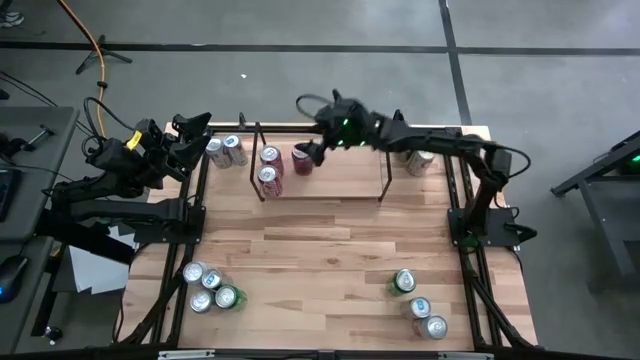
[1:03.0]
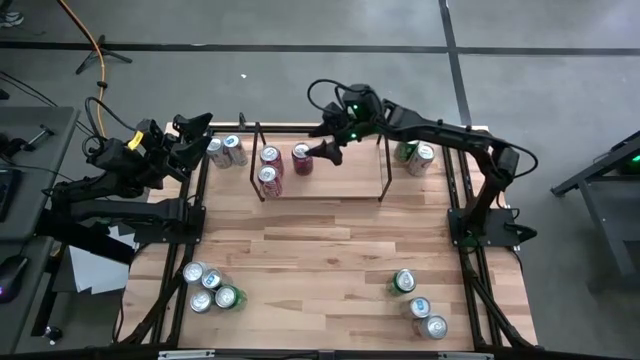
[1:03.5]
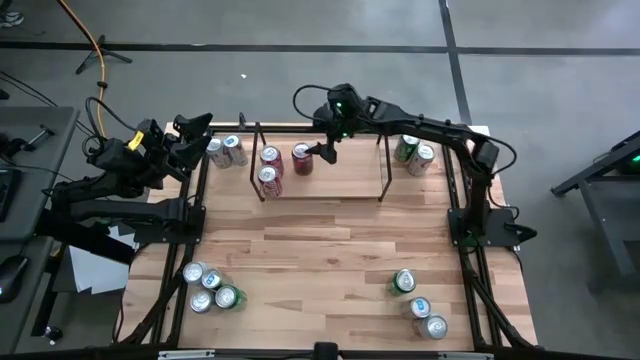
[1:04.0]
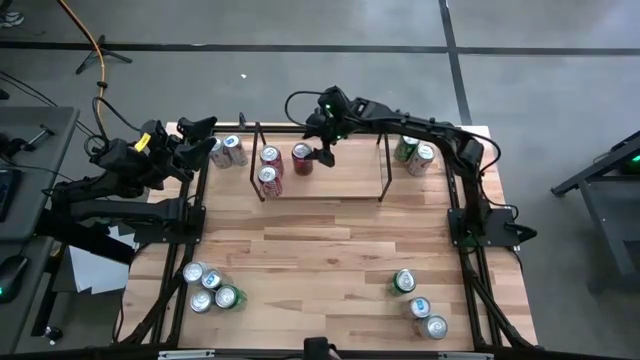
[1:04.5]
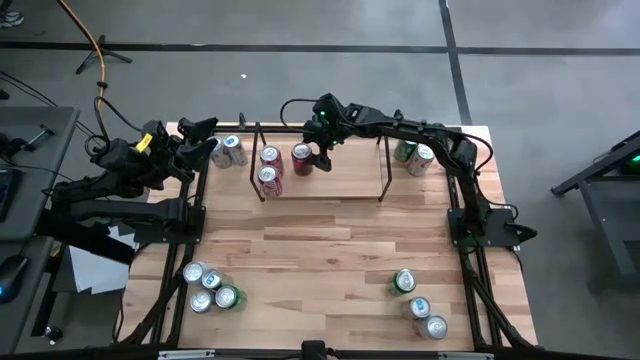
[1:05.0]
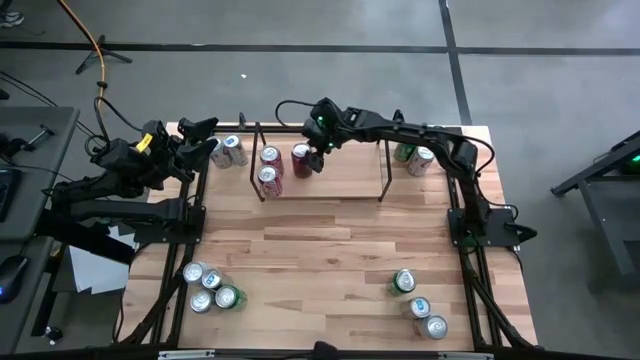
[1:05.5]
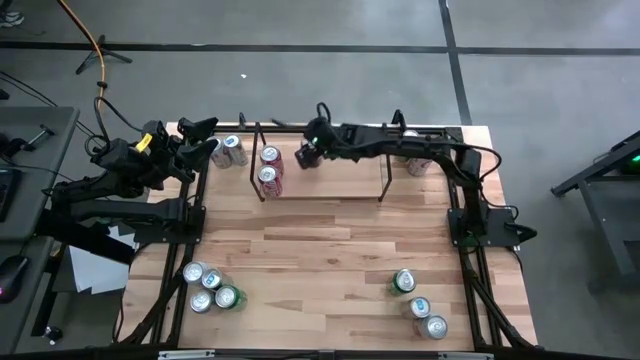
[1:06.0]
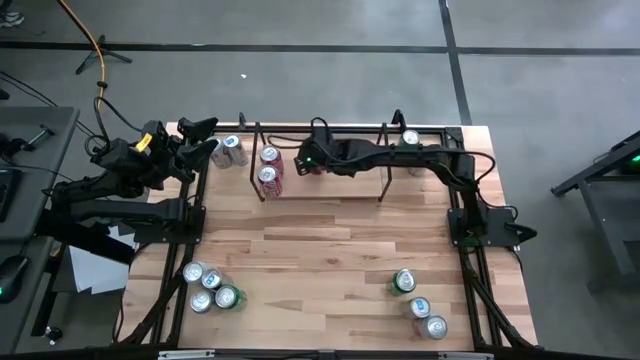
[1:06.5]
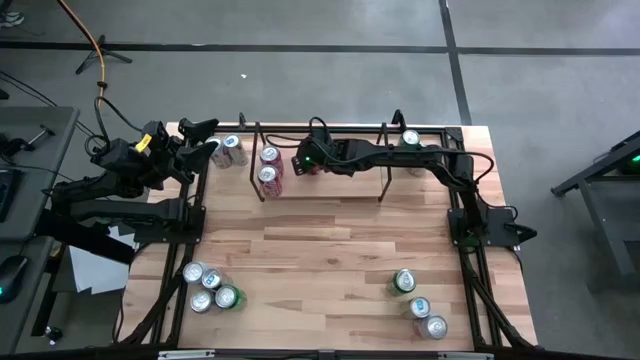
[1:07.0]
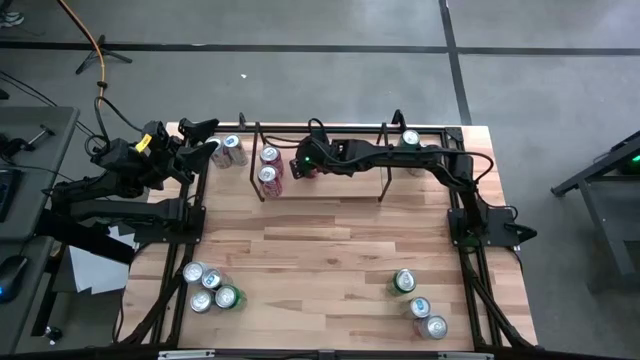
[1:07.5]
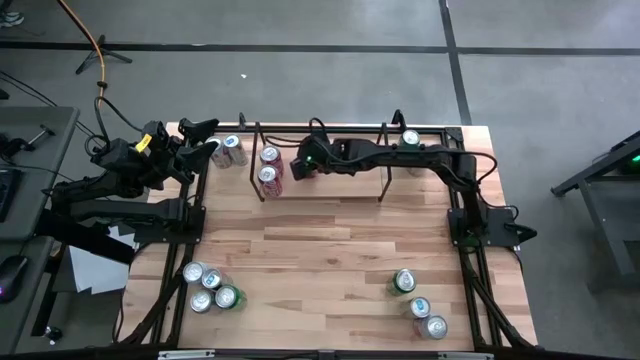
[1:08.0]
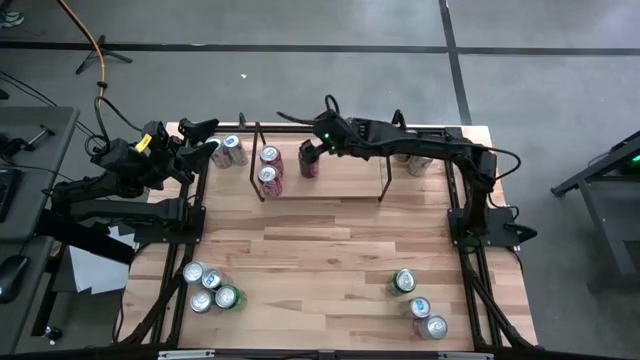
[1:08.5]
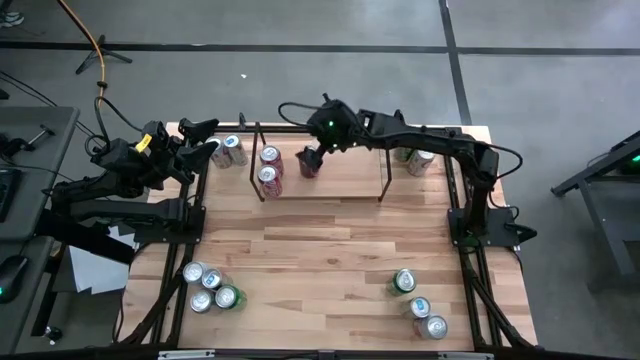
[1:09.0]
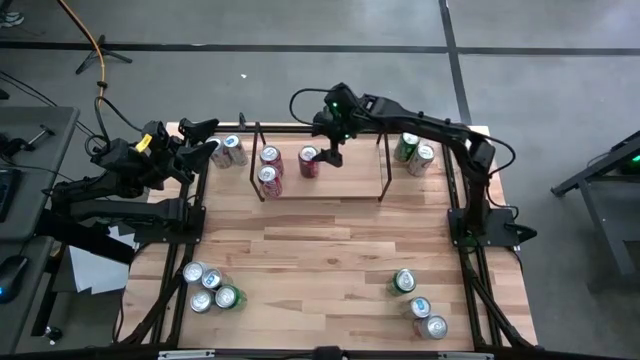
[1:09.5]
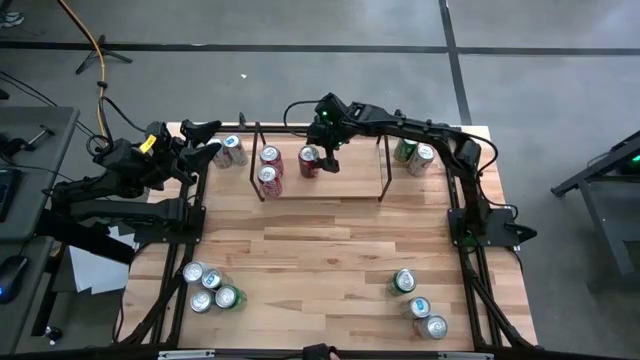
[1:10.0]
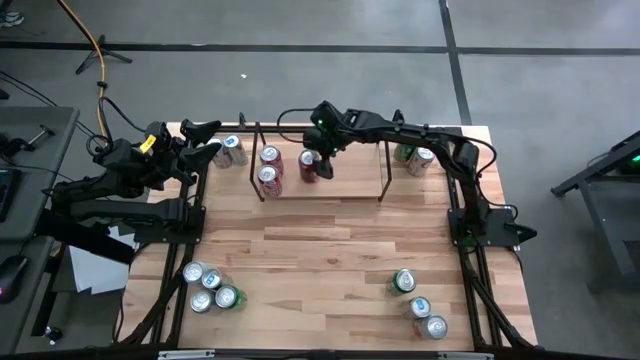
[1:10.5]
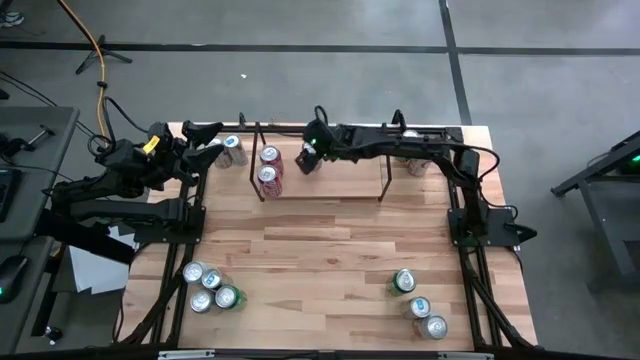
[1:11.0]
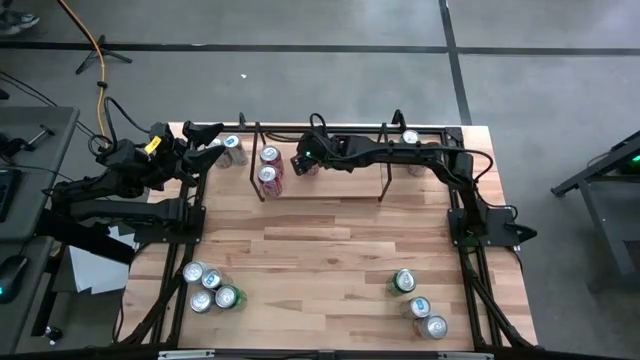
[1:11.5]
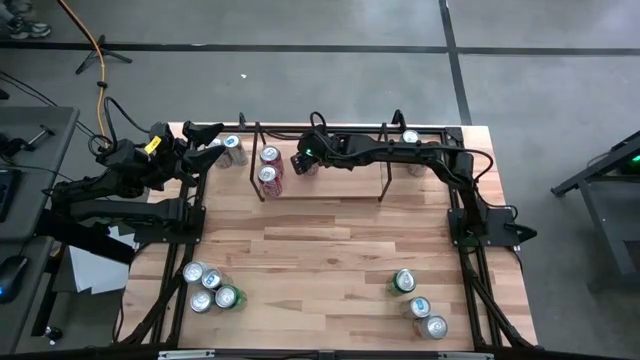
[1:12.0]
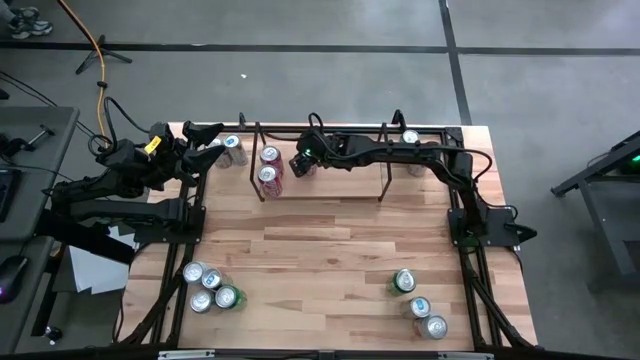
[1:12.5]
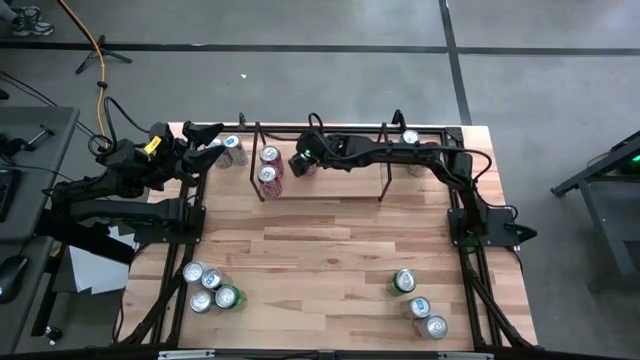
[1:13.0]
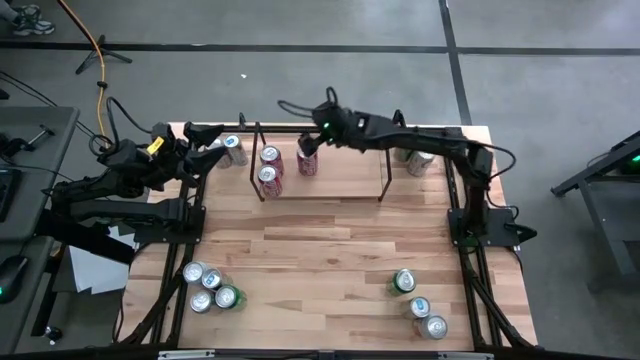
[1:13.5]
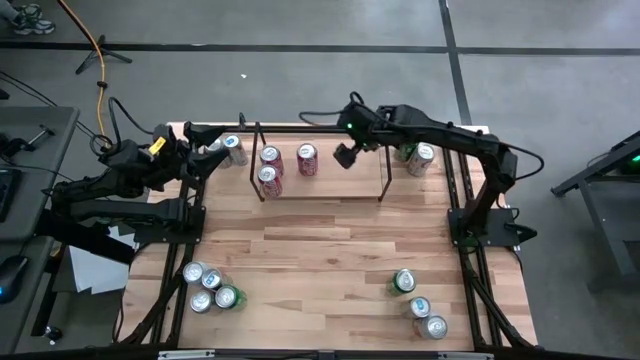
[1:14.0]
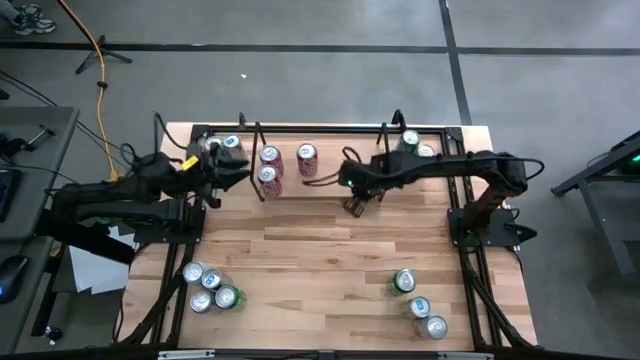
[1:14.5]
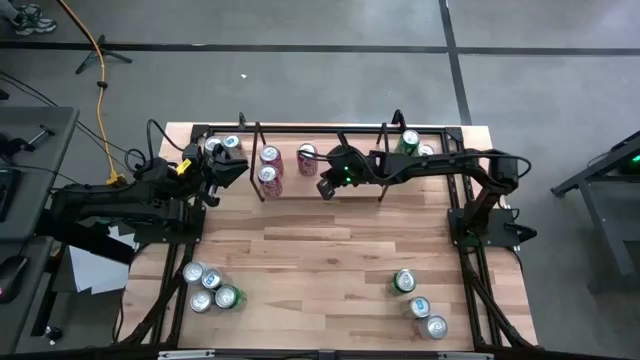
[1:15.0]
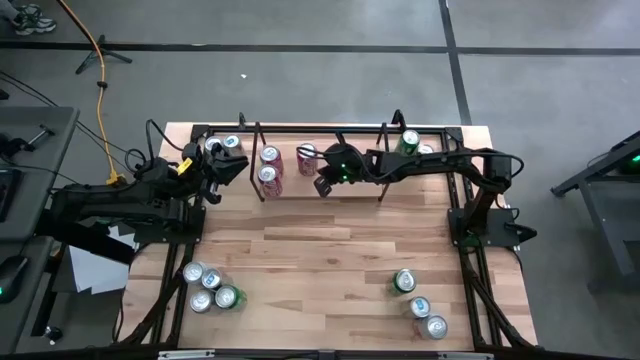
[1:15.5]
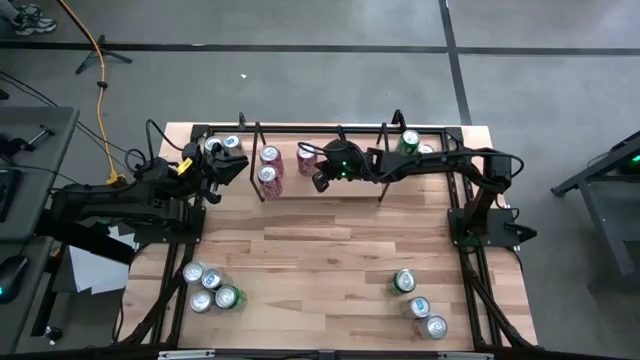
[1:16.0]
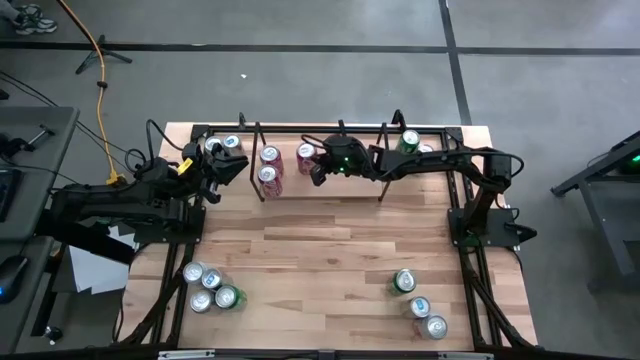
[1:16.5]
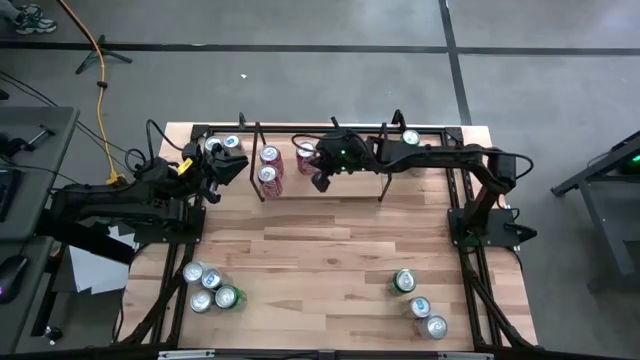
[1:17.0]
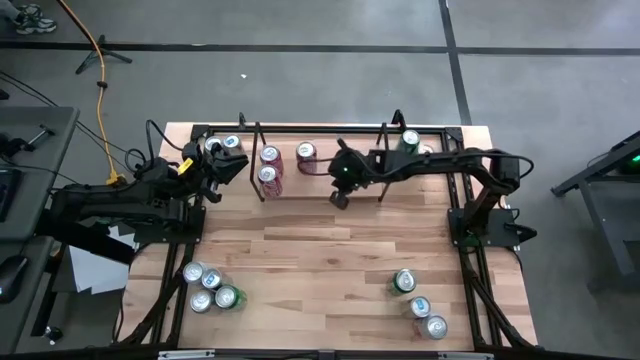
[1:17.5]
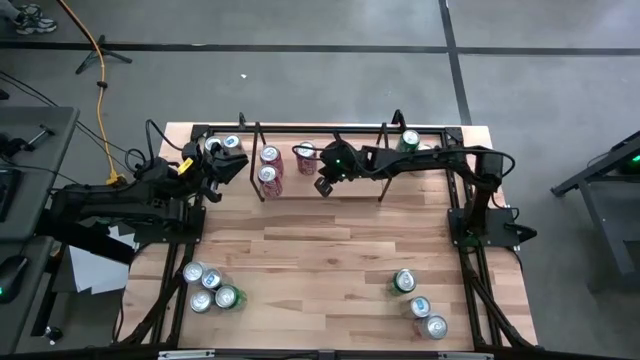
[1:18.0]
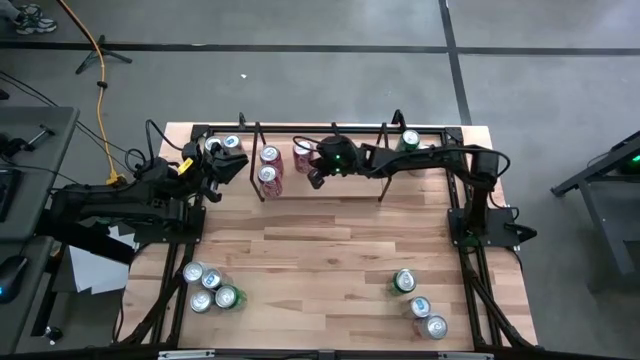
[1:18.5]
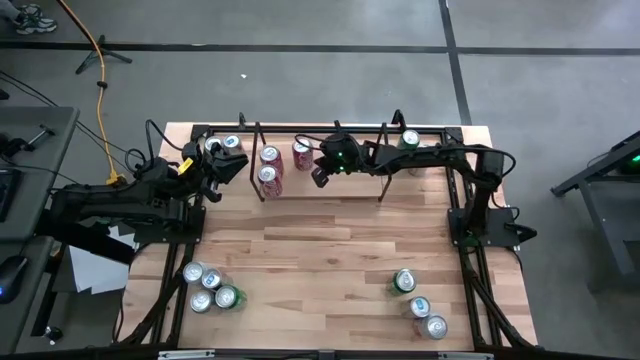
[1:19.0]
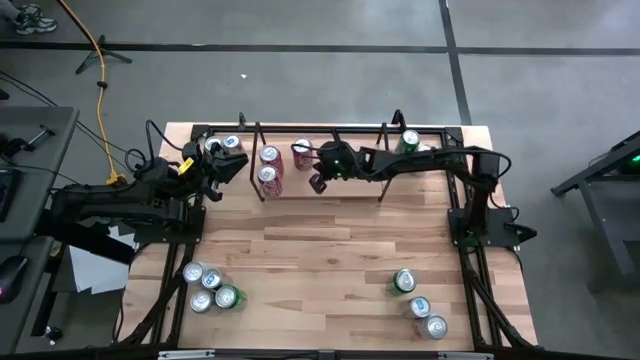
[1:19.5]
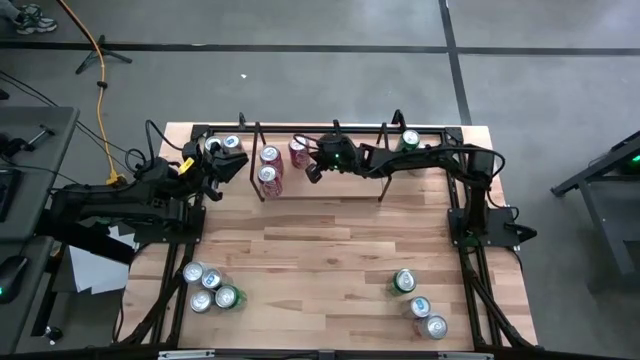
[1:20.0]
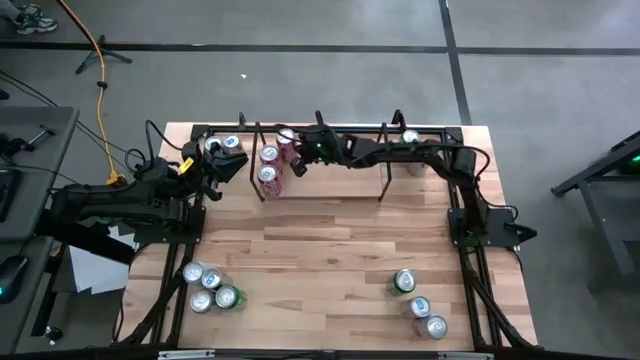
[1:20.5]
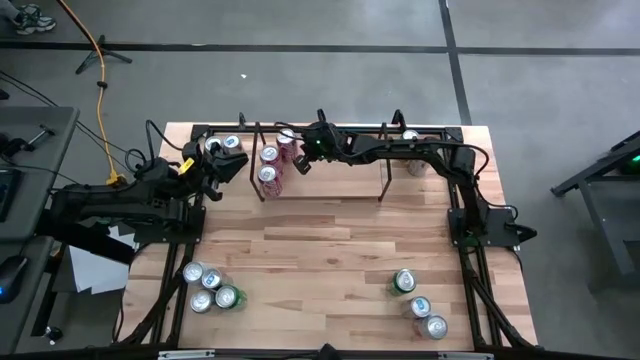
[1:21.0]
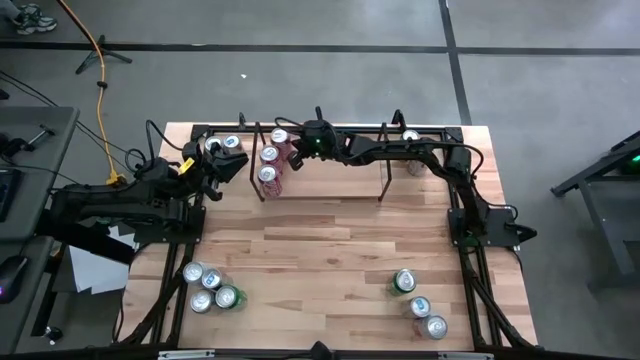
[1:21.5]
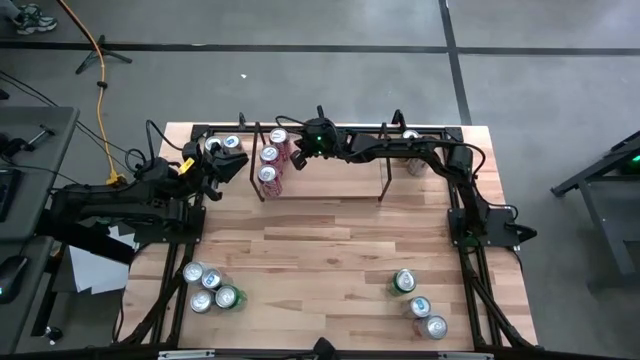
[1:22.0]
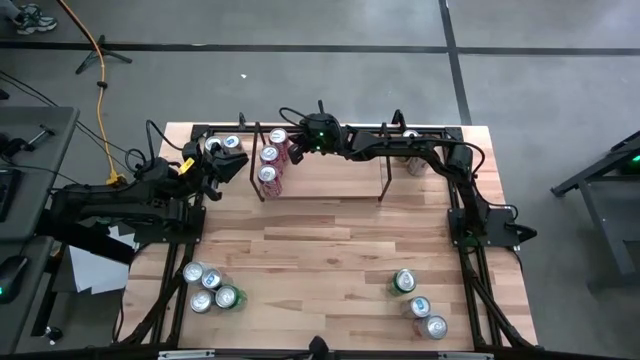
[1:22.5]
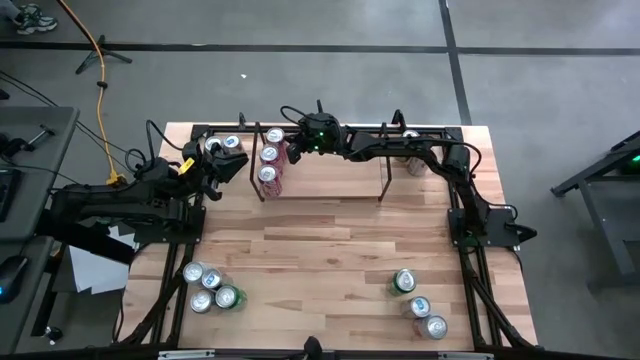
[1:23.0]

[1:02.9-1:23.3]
Task: Place canned beverage on shelf
Put the red soda can on the shelf aligned with the other red soda cans
